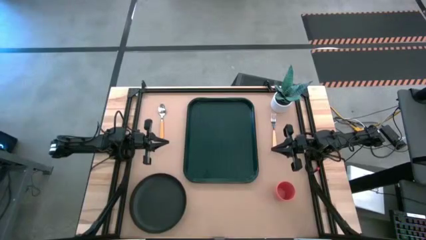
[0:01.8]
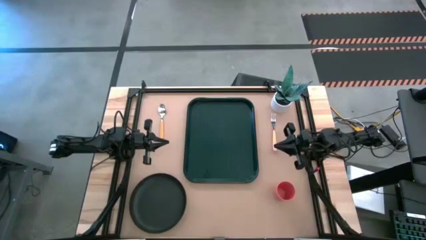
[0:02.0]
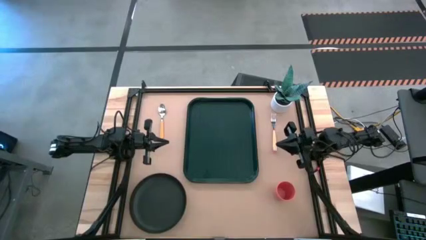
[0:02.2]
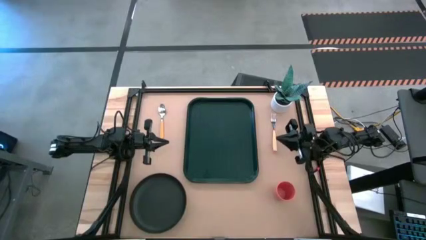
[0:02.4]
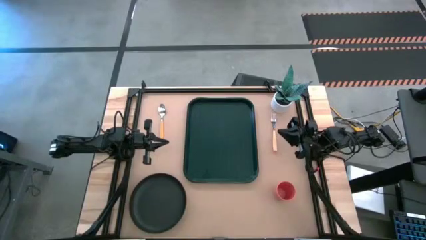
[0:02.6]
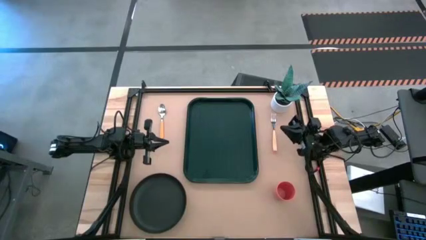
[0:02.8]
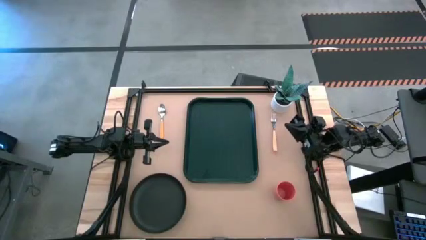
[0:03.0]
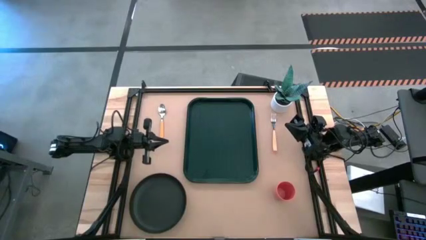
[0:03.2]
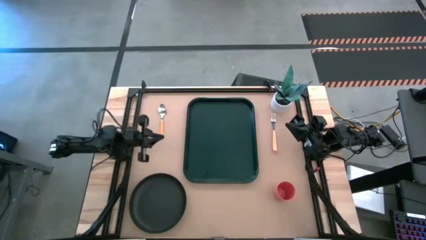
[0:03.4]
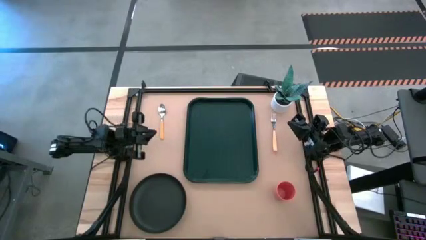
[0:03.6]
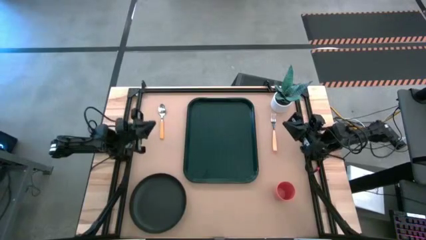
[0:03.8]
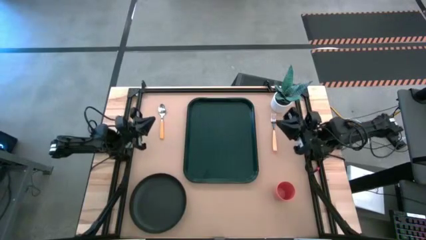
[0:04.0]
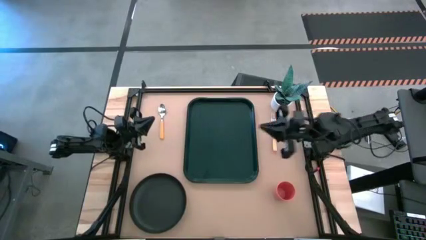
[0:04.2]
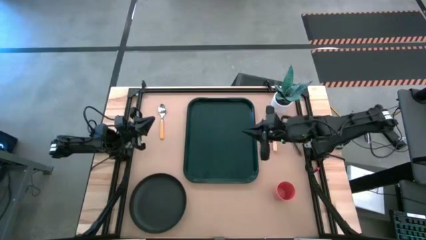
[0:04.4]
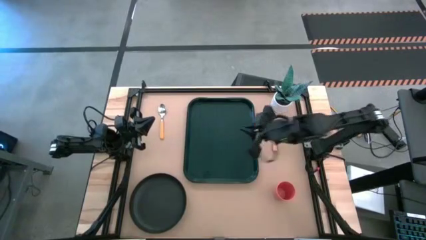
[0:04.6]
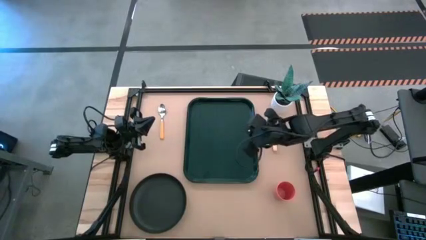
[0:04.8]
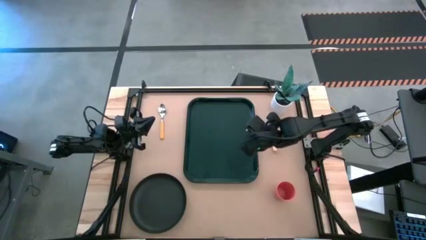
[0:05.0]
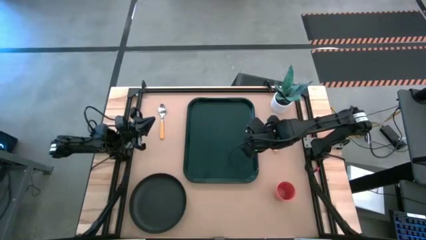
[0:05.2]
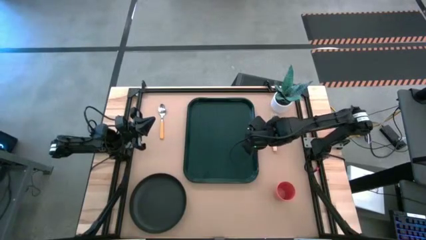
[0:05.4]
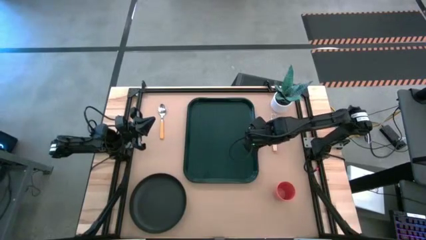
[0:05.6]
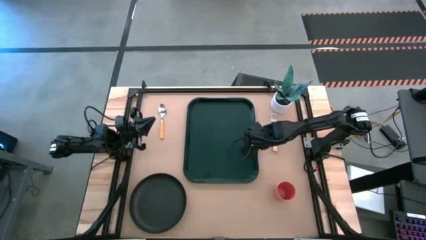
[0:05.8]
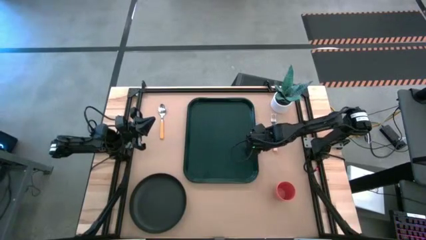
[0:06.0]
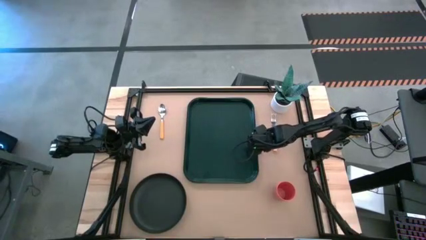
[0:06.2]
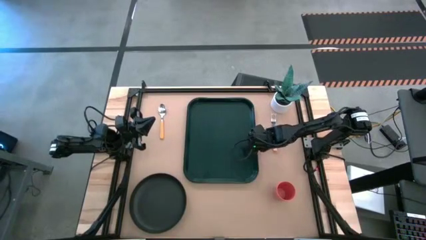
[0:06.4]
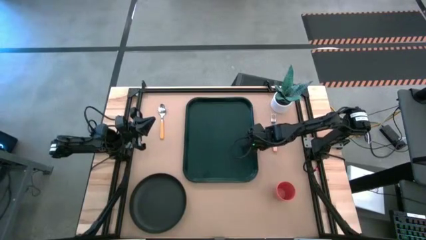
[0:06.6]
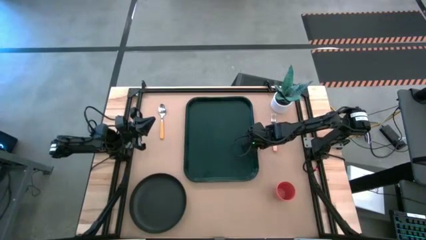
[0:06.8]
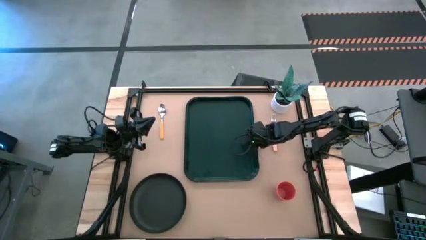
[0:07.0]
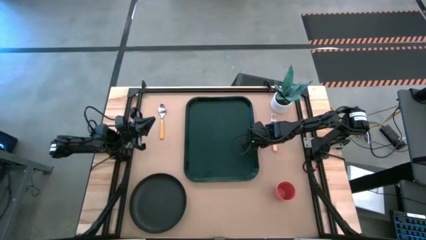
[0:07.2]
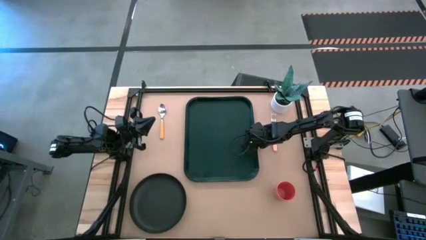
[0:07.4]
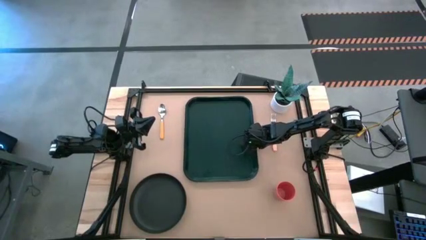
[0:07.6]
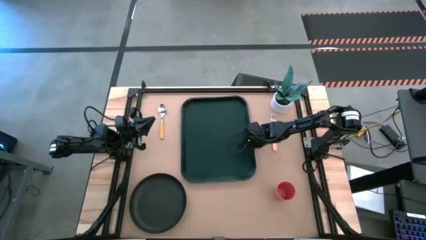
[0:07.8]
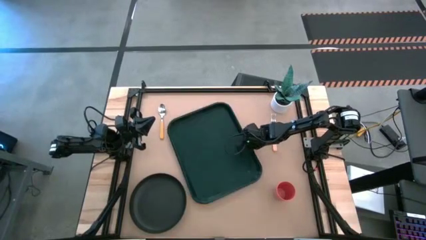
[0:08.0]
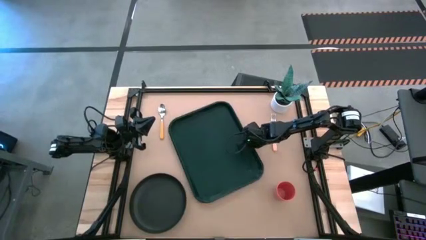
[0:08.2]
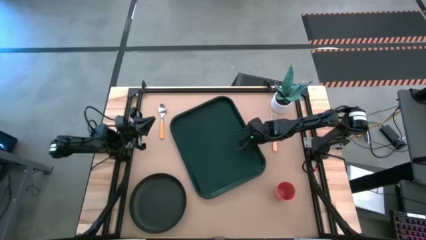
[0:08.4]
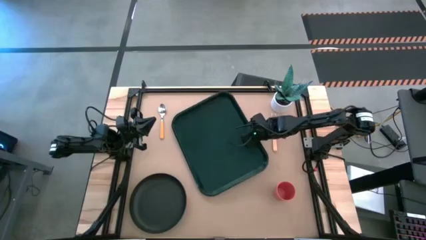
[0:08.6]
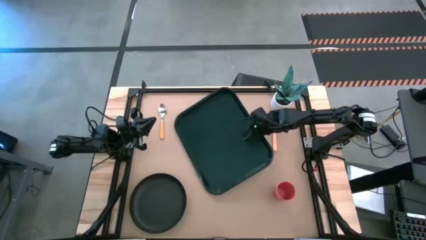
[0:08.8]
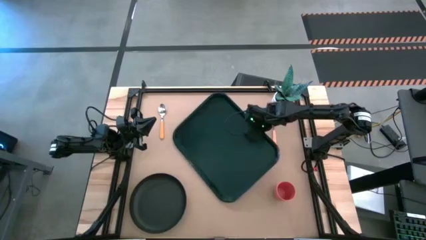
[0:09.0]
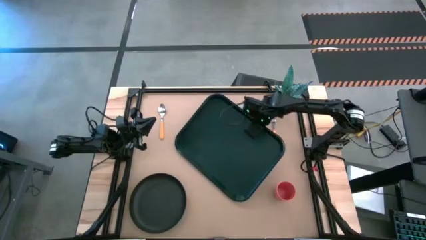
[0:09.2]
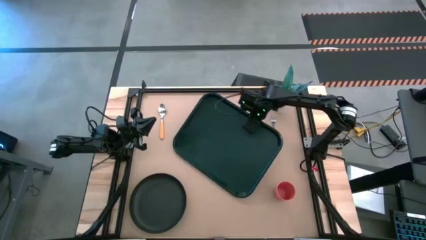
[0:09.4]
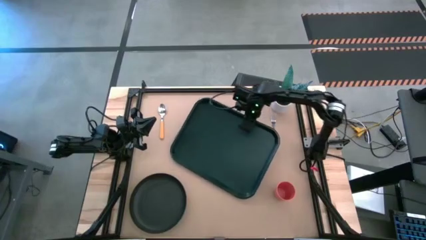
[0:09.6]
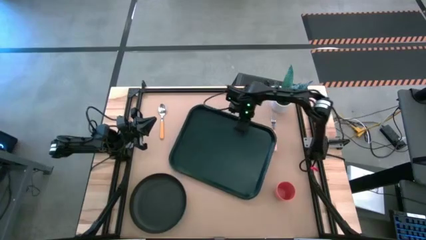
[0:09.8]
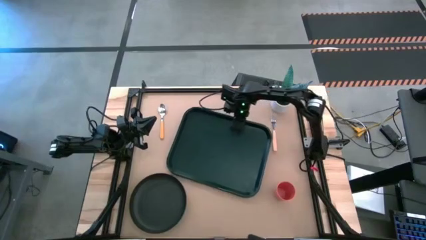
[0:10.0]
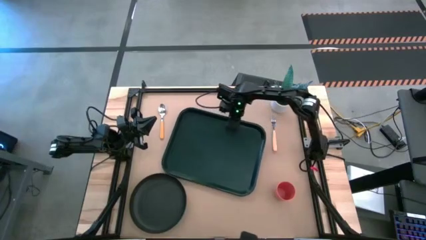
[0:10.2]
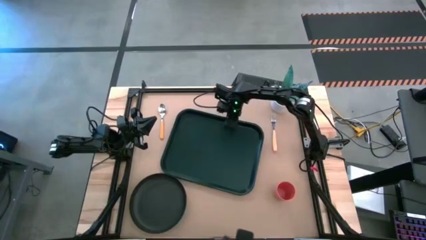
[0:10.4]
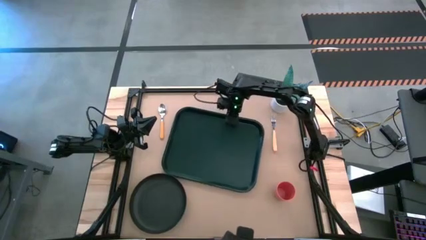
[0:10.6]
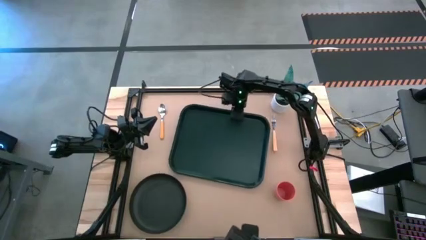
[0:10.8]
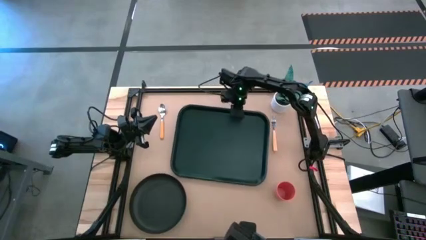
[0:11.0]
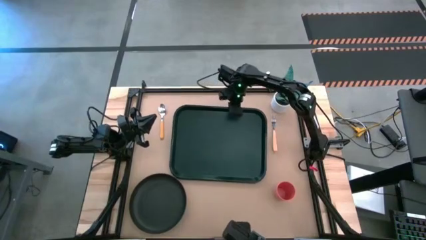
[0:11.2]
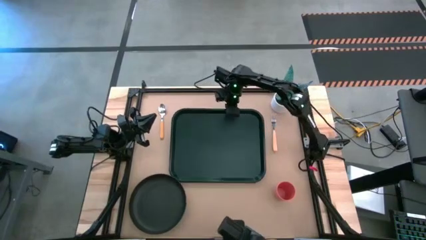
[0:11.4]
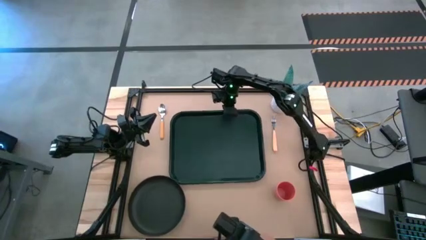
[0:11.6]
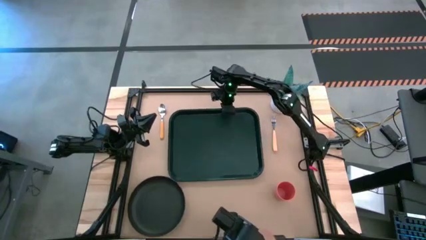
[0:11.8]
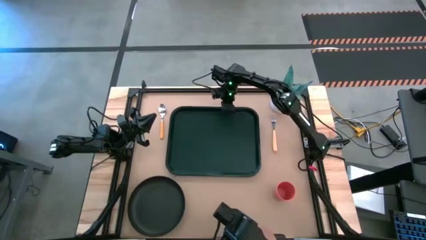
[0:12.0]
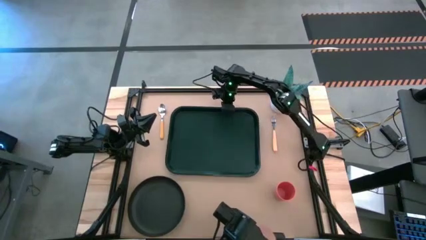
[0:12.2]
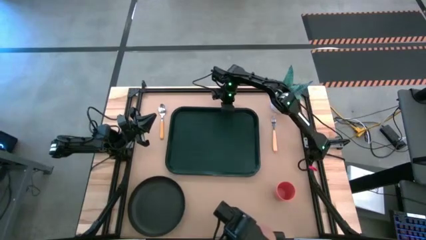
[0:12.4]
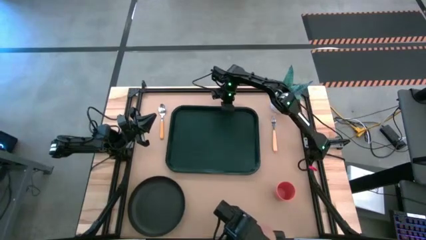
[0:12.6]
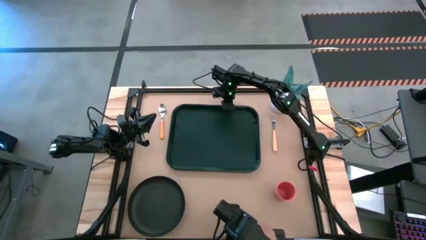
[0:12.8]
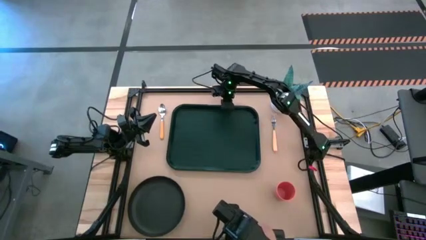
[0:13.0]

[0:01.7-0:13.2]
Task: Pick and place plate/cup/fork/spoon on tray
Adjust the black serving tray

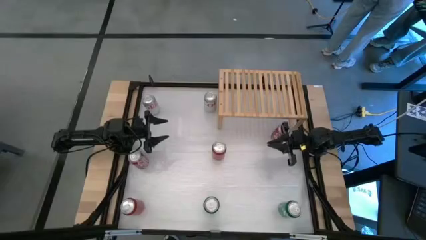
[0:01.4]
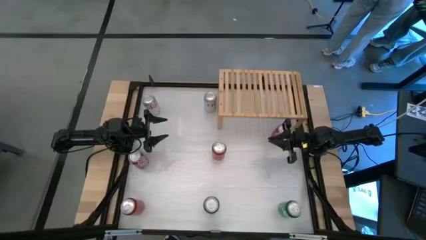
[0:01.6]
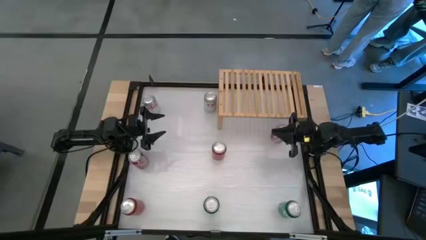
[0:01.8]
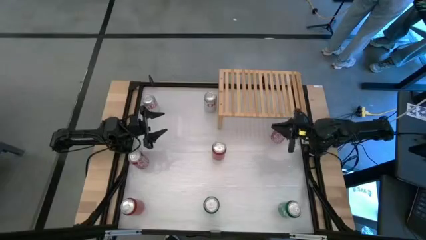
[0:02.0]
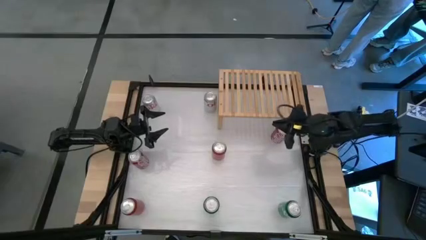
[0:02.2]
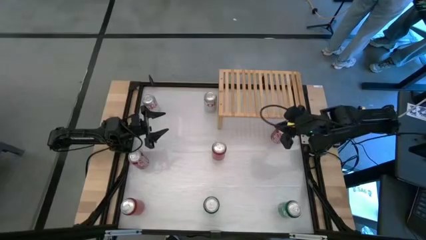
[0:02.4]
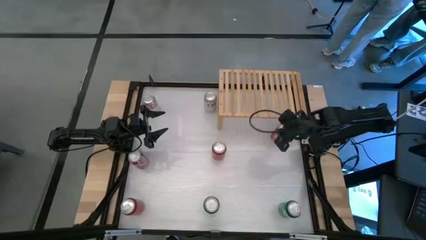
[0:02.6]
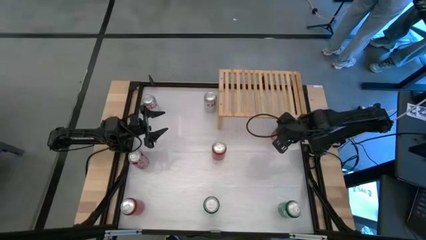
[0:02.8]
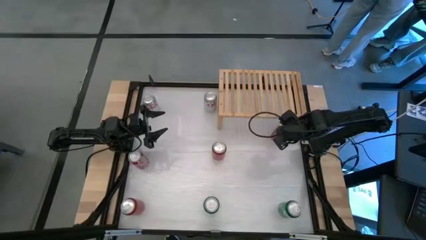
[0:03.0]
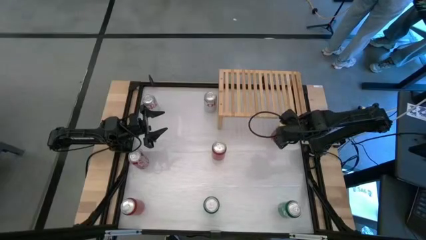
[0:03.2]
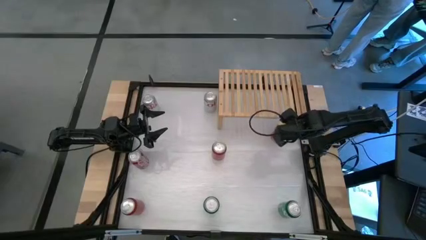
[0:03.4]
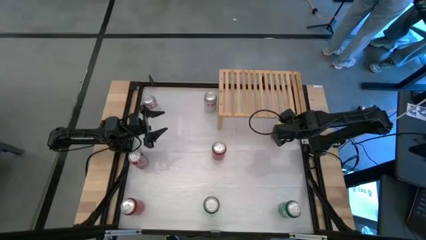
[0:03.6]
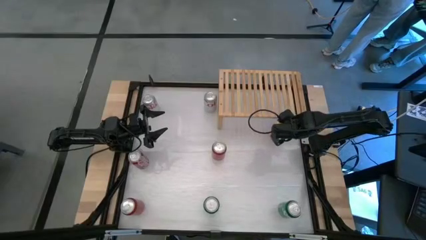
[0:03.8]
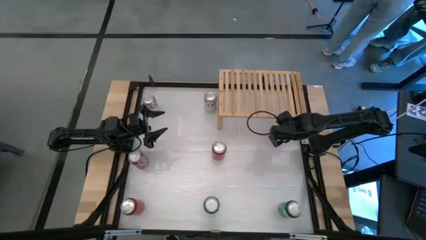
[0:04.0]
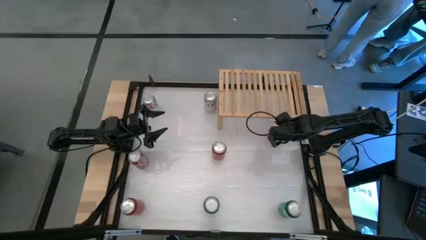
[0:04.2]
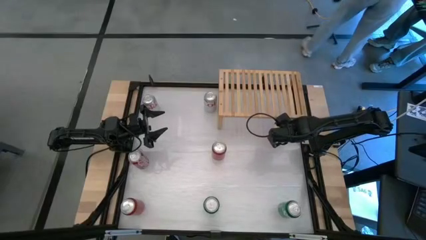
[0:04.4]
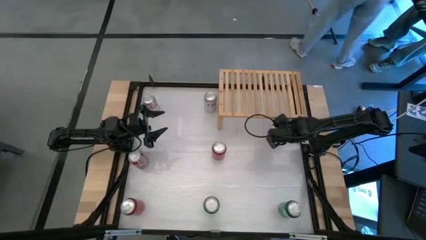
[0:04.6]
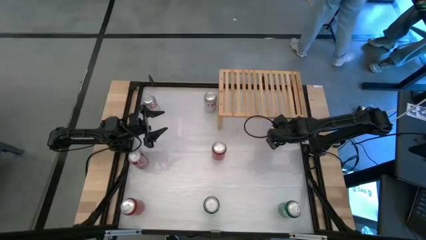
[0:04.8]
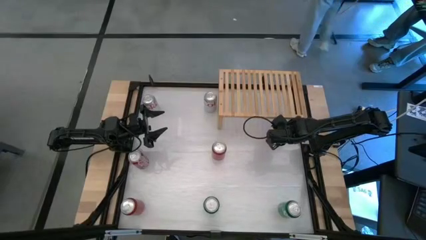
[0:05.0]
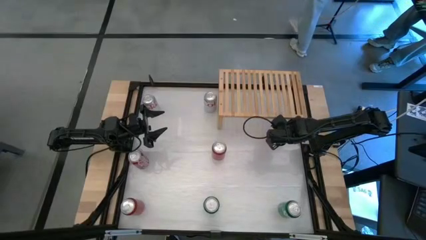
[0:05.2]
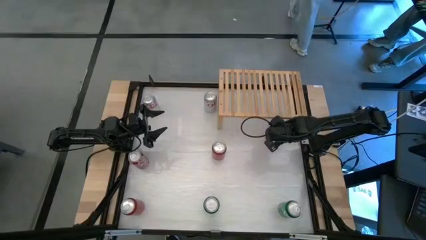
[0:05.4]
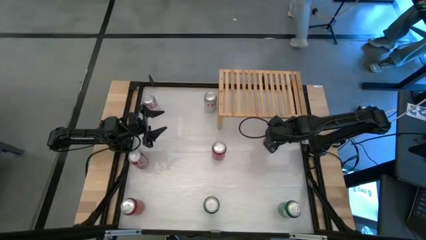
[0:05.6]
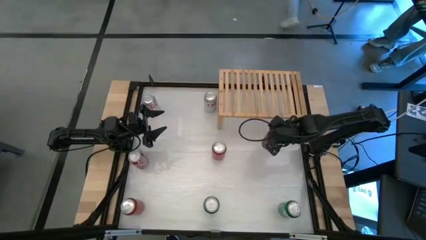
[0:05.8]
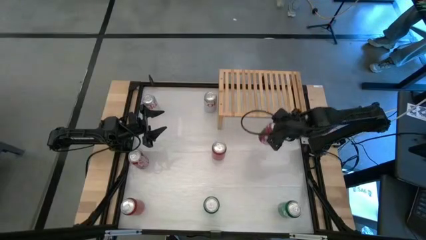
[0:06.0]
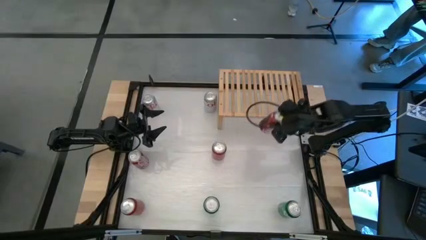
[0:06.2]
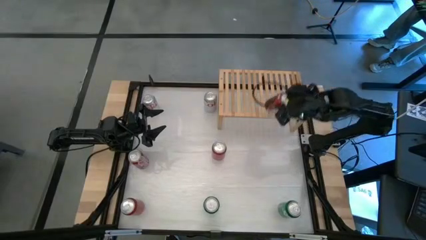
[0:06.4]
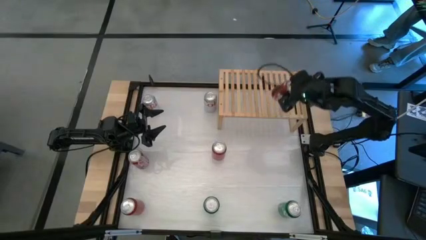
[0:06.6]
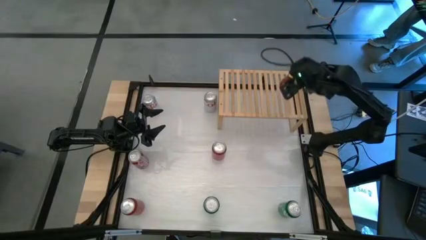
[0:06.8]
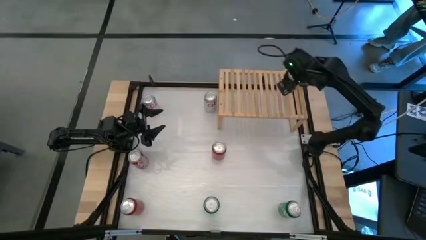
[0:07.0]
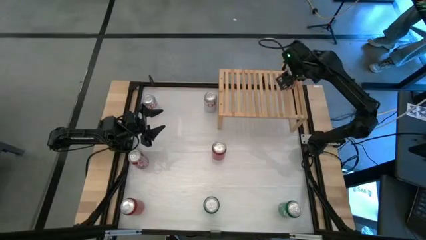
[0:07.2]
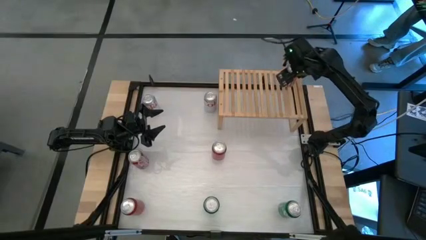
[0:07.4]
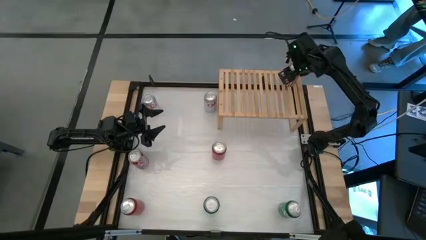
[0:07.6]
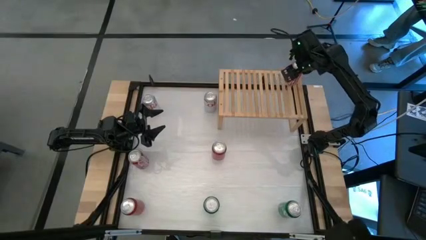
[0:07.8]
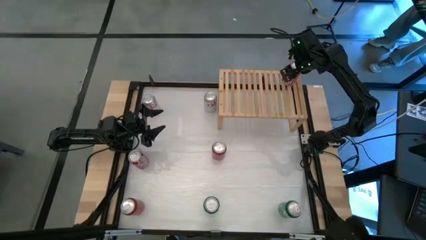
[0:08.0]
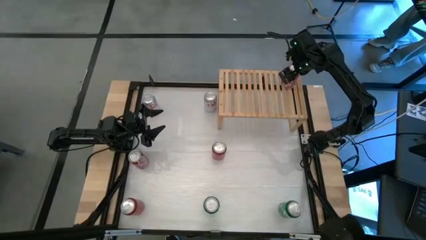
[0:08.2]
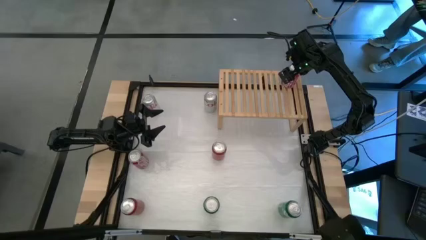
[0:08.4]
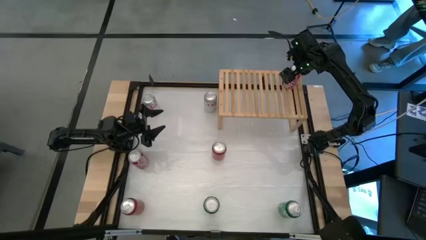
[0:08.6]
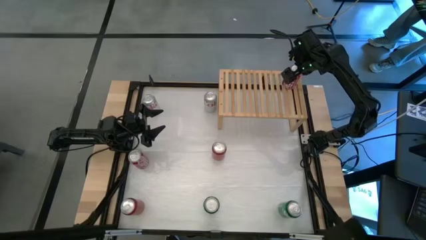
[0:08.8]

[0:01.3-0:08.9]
Task: Place canned beverage on shelf
Put the right red white soda can on the shelf
